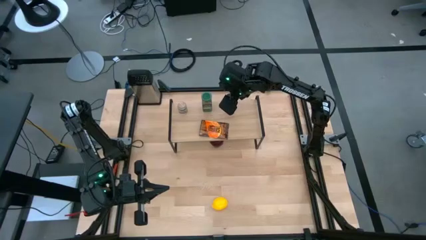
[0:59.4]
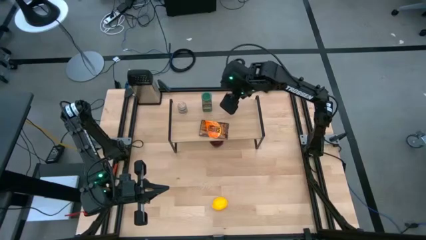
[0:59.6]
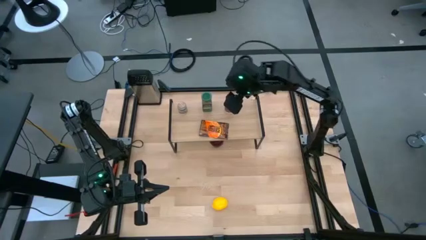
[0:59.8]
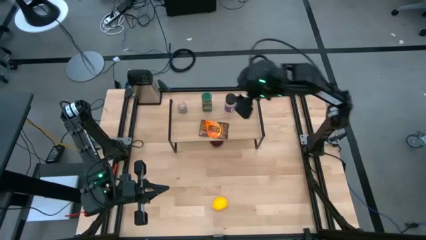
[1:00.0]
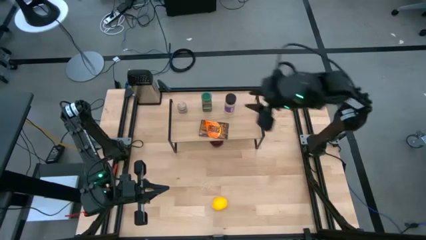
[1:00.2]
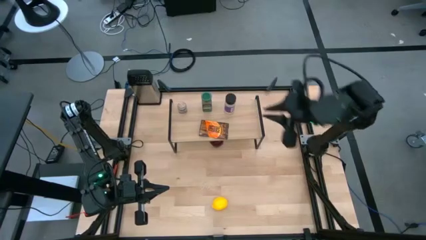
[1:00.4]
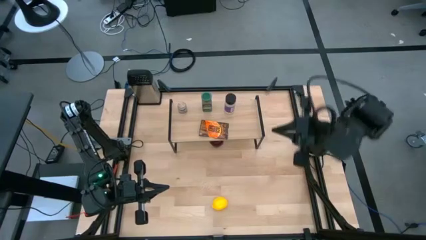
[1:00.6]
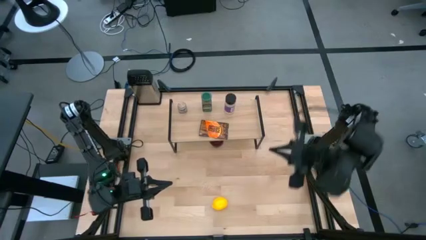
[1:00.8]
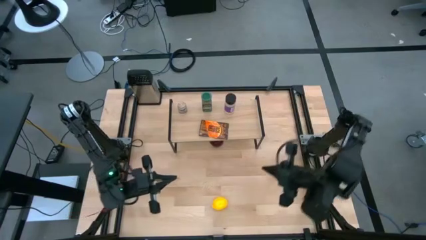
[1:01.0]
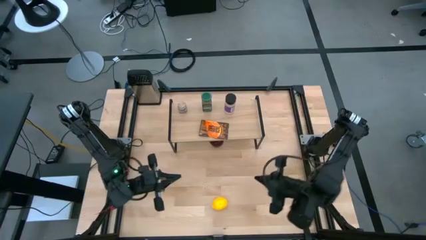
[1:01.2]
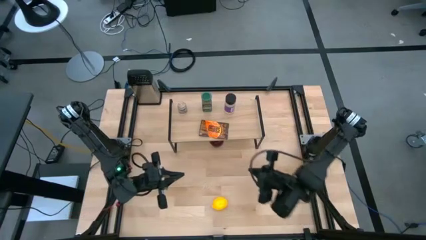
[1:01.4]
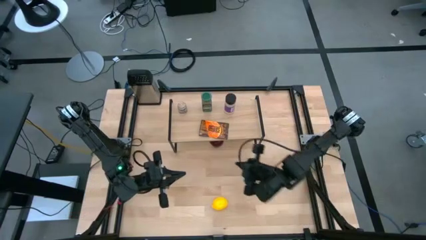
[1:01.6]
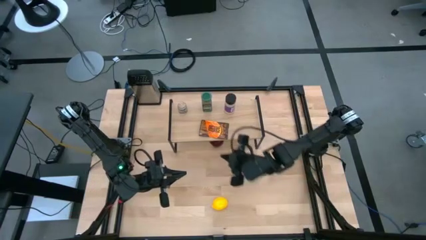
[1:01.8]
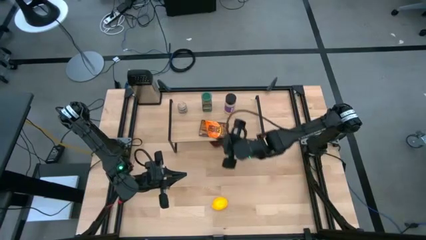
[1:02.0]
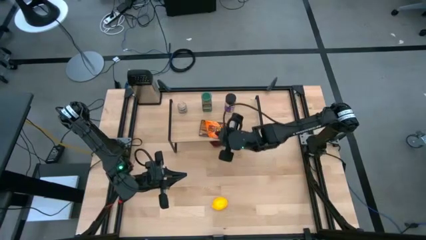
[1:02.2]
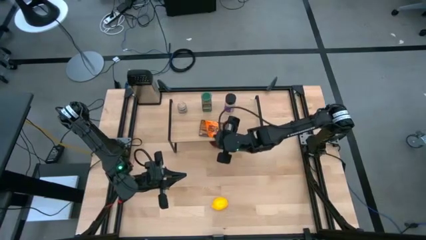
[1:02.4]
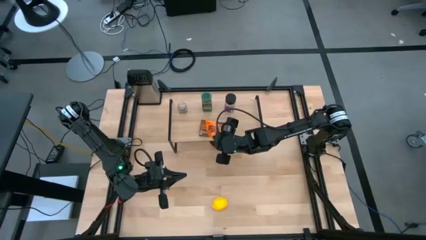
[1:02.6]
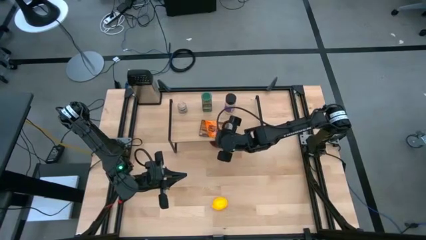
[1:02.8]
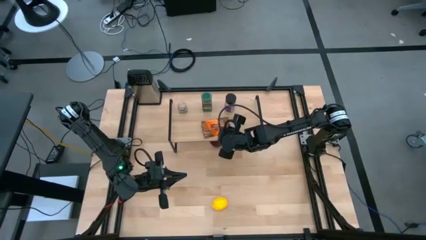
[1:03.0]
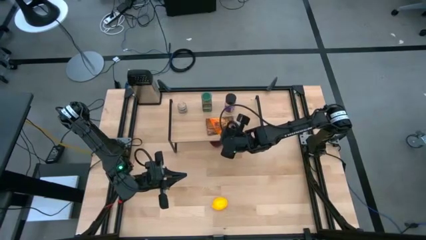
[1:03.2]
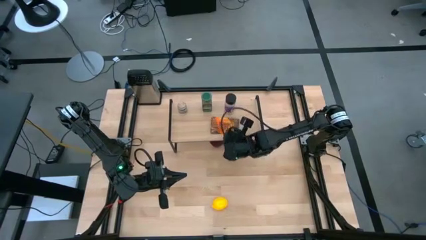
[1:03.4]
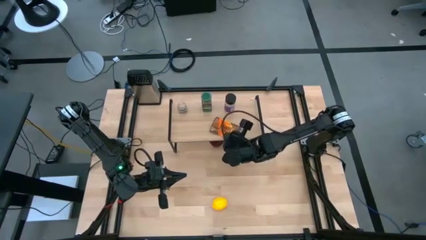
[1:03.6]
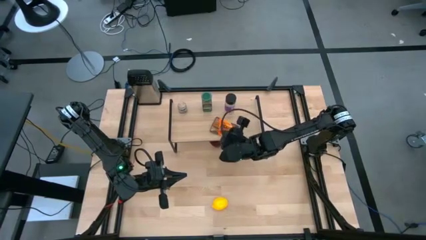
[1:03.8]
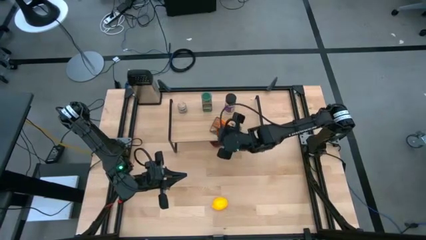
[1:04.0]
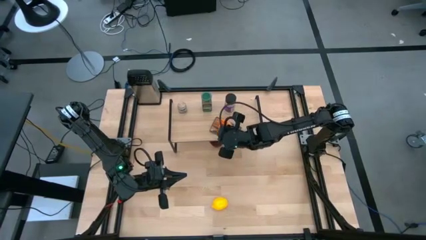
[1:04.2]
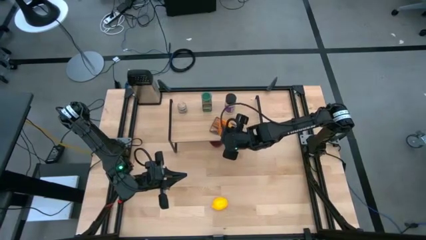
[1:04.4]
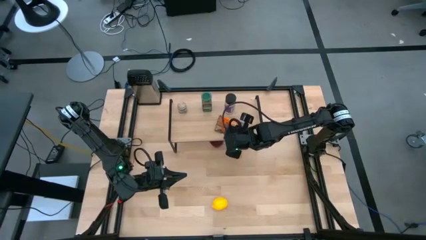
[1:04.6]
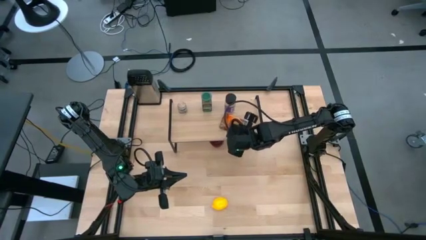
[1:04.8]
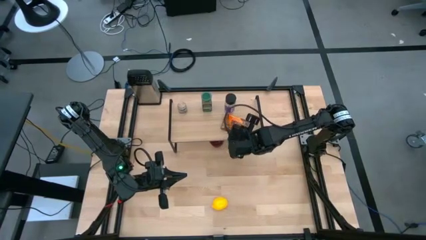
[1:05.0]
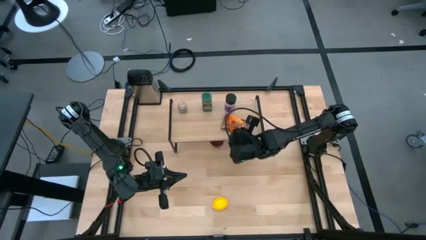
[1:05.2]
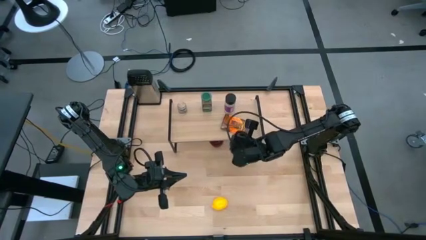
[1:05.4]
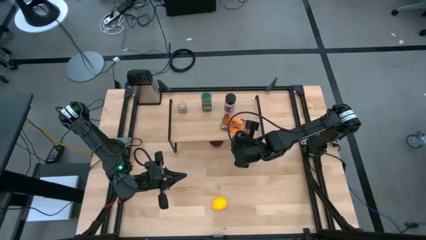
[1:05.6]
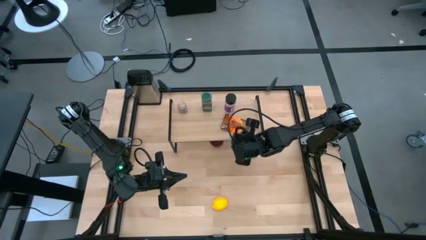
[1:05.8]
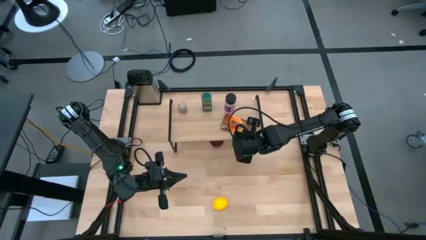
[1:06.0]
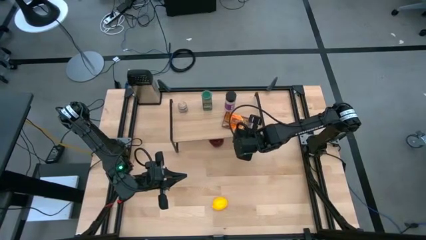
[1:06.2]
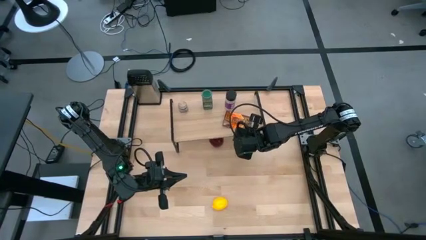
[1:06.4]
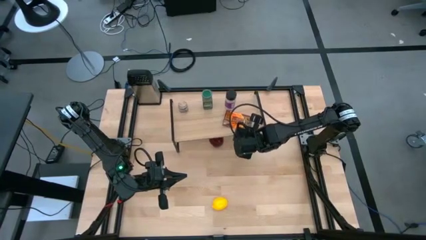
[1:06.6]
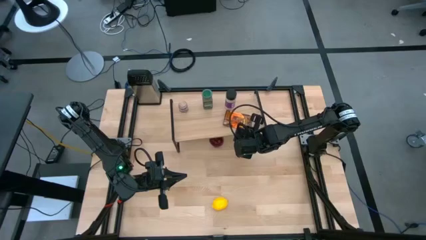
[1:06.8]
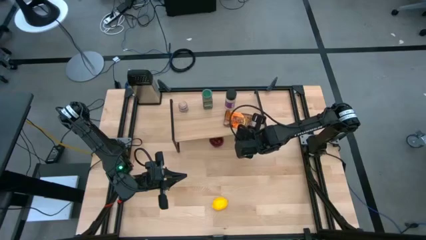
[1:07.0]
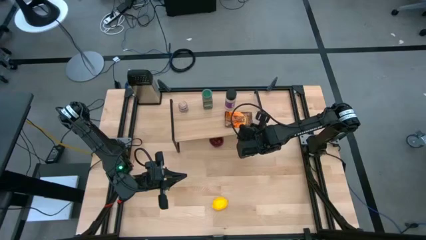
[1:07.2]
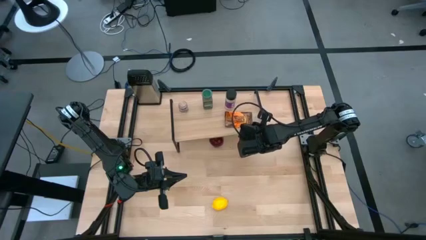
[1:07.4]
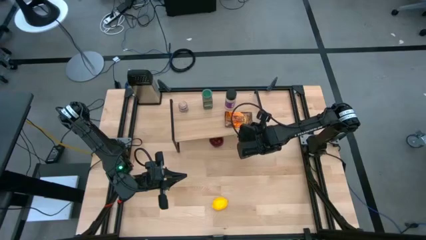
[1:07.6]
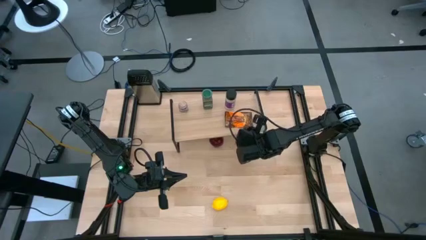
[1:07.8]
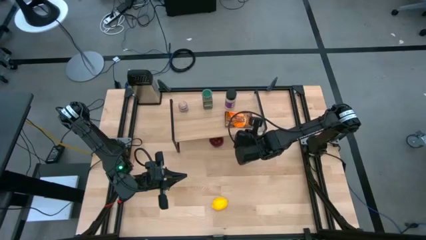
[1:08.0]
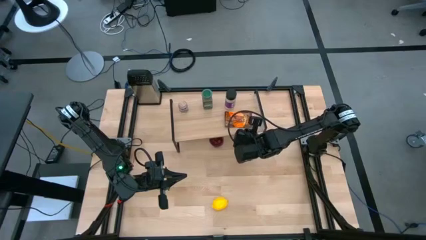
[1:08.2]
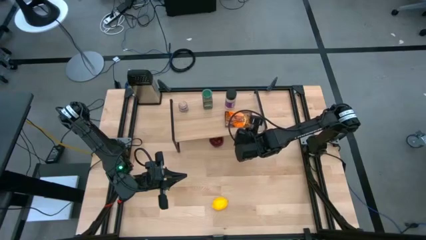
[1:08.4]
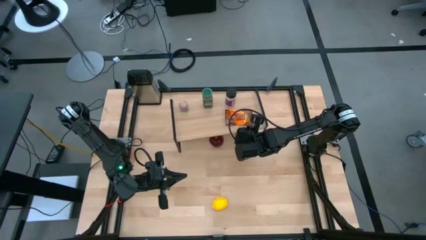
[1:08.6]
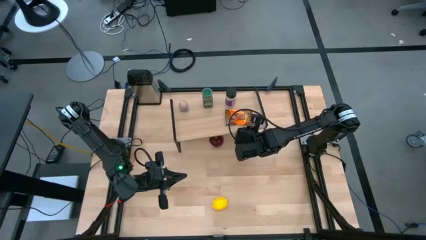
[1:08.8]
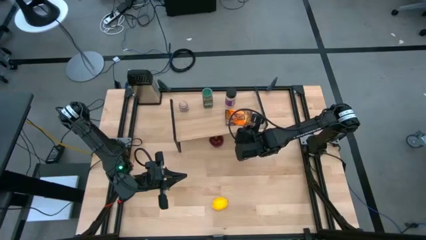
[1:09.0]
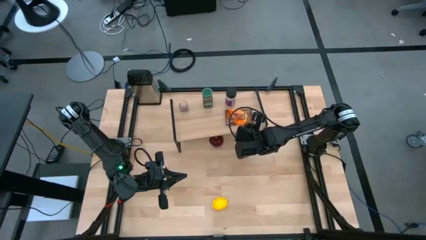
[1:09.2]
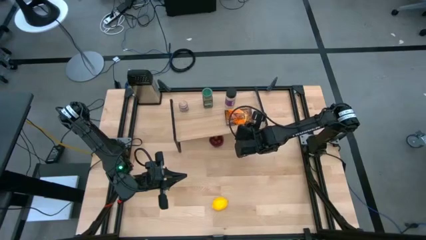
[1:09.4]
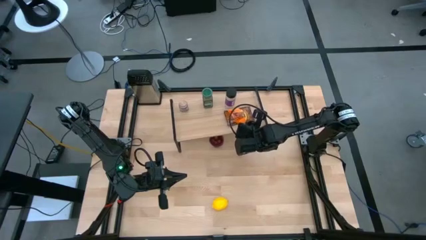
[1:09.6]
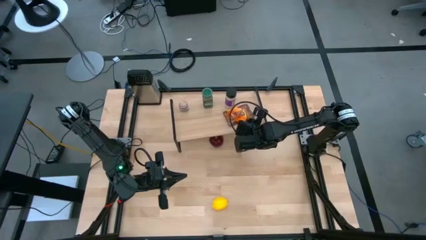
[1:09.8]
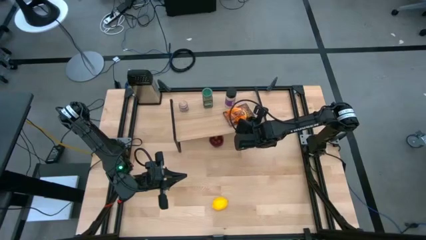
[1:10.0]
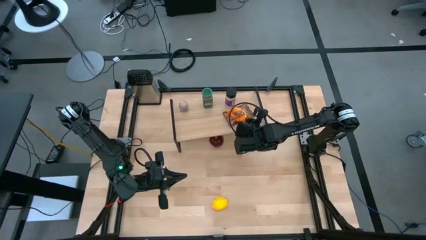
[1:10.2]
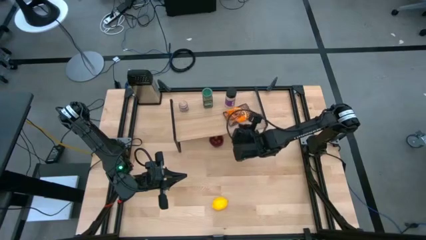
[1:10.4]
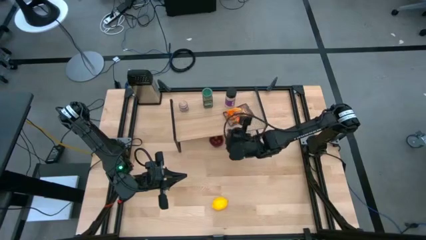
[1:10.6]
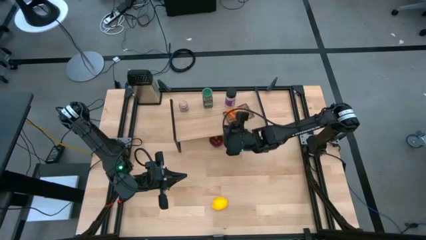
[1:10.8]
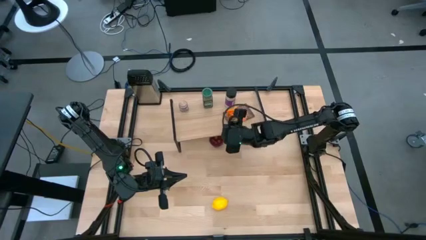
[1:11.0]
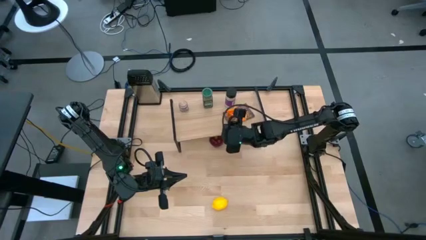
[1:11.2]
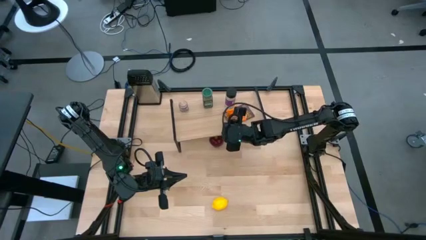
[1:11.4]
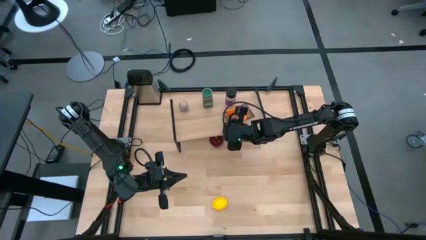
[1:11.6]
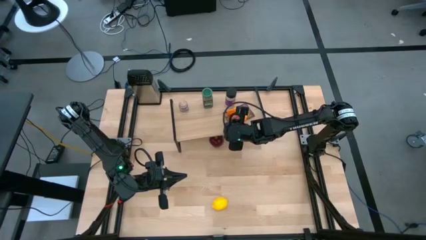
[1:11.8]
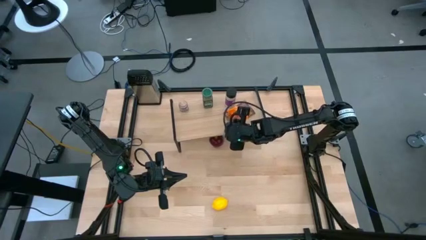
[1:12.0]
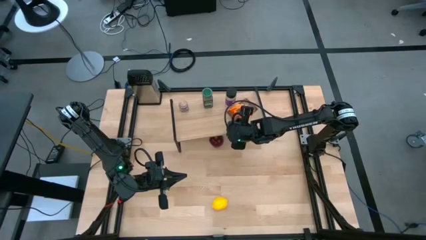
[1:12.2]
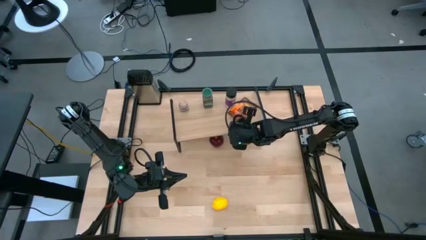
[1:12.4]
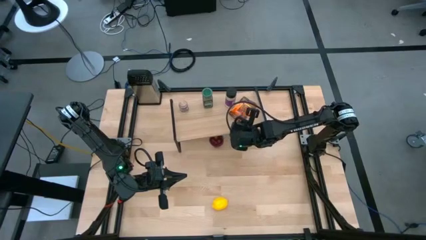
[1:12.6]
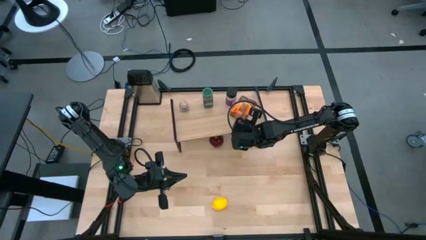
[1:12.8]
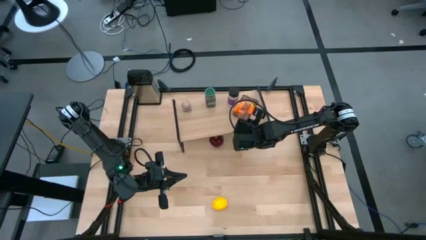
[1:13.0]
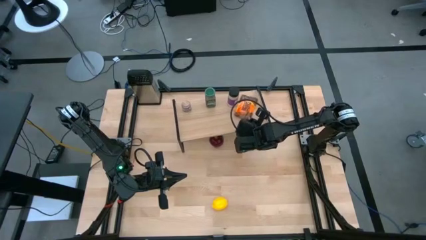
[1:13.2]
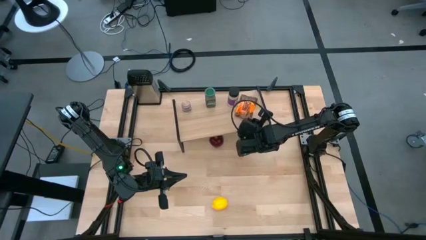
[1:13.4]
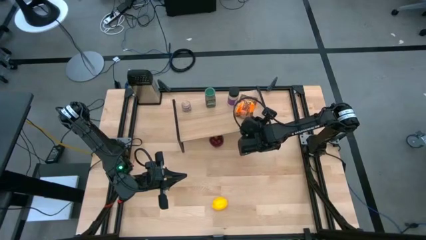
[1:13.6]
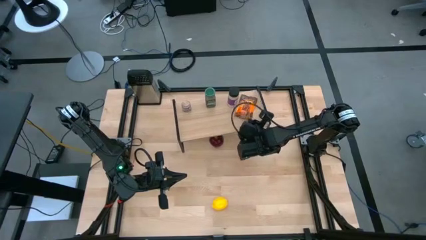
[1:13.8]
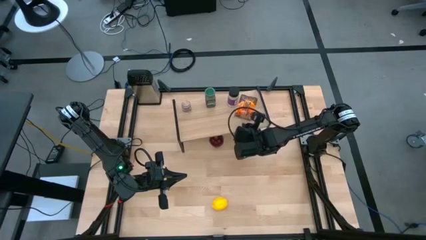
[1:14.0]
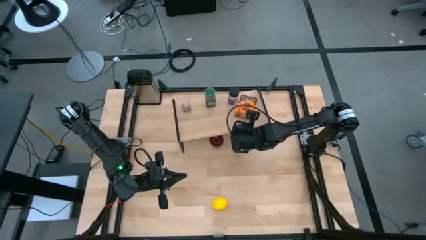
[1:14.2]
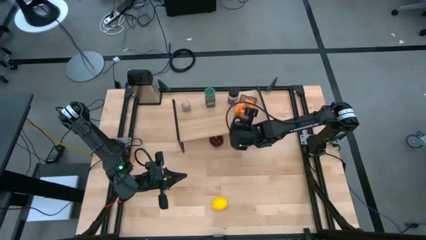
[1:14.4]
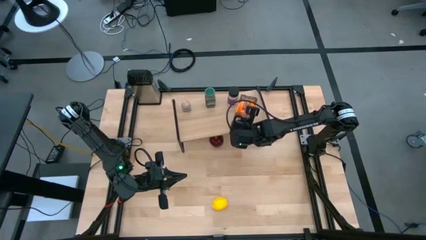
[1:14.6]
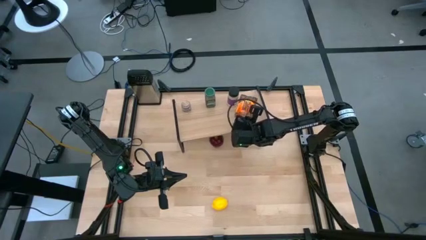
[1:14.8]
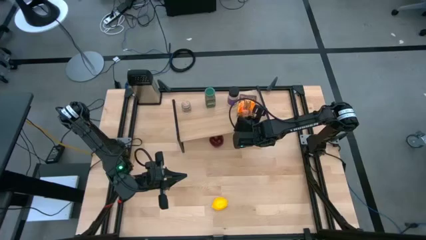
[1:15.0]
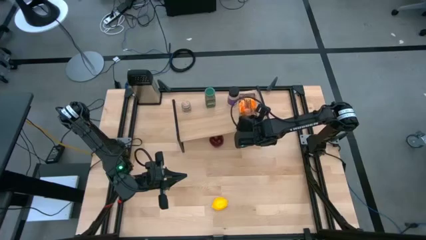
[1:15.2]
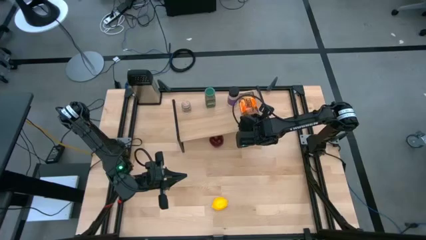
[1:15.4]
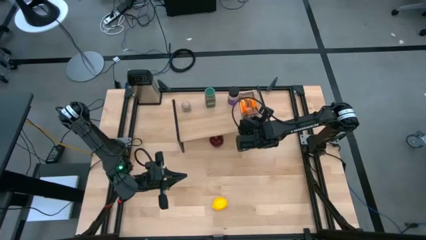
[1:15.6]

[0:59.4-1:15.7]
Task: Shelf spices
Adjust the orange seasoning bag
